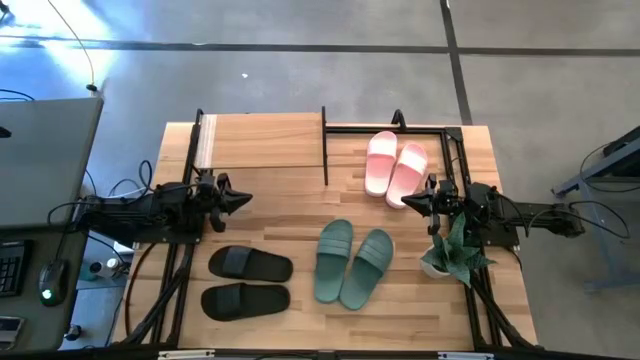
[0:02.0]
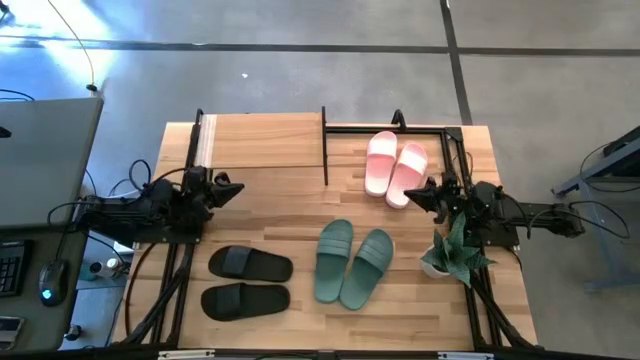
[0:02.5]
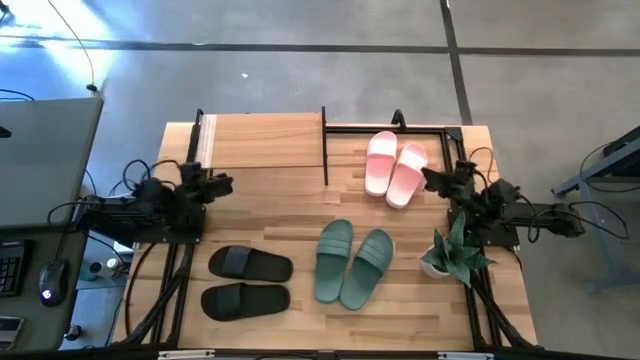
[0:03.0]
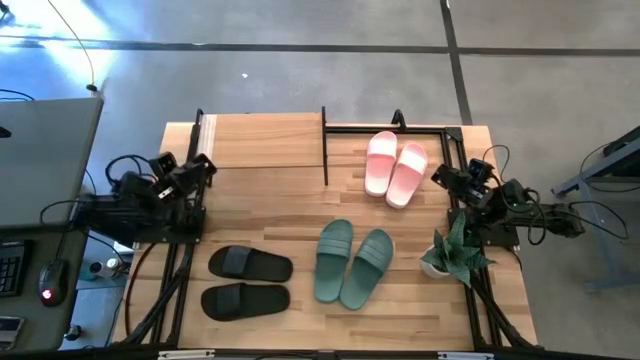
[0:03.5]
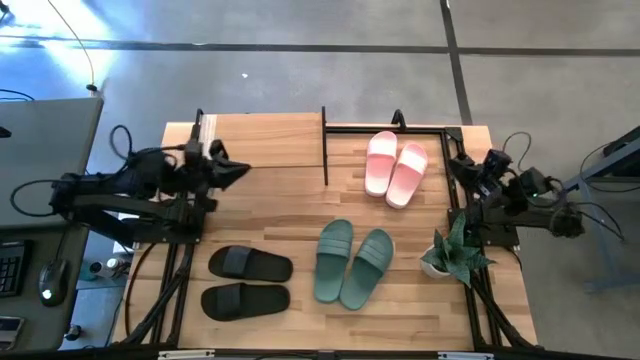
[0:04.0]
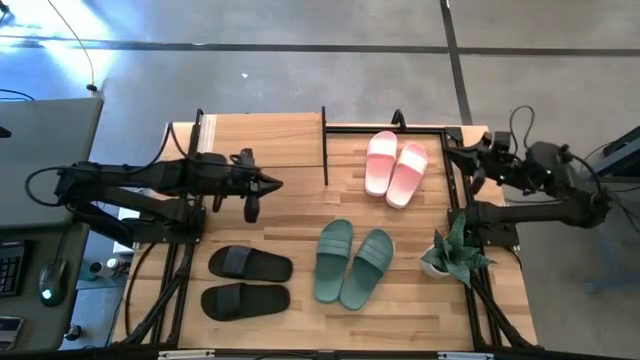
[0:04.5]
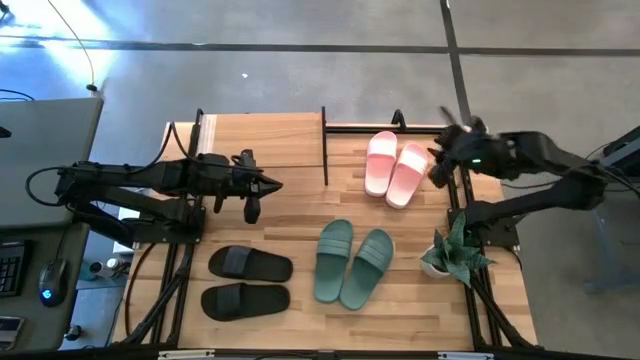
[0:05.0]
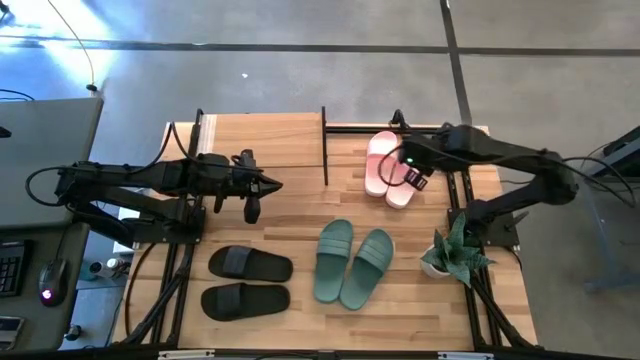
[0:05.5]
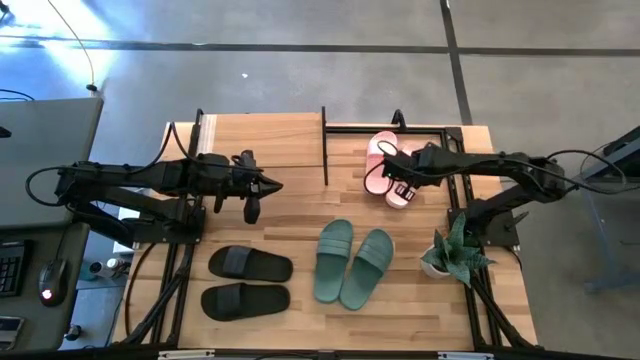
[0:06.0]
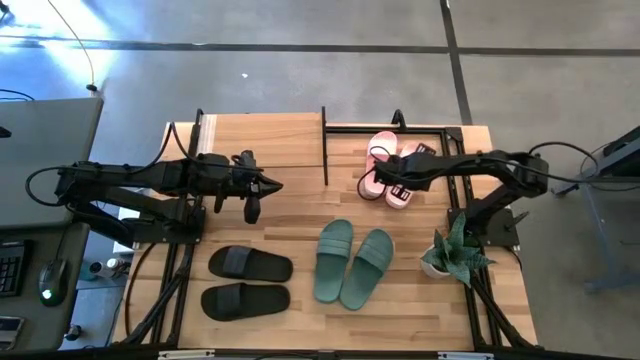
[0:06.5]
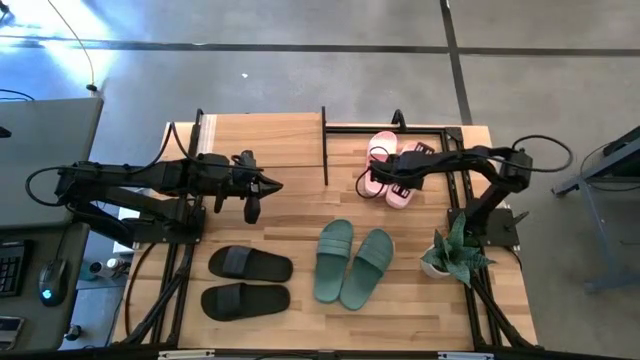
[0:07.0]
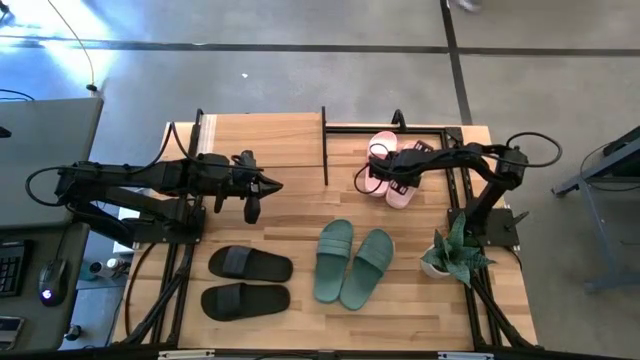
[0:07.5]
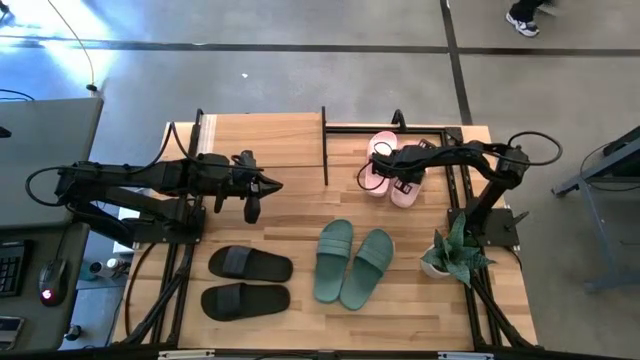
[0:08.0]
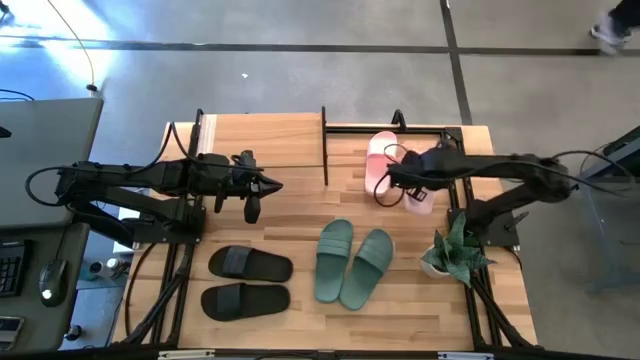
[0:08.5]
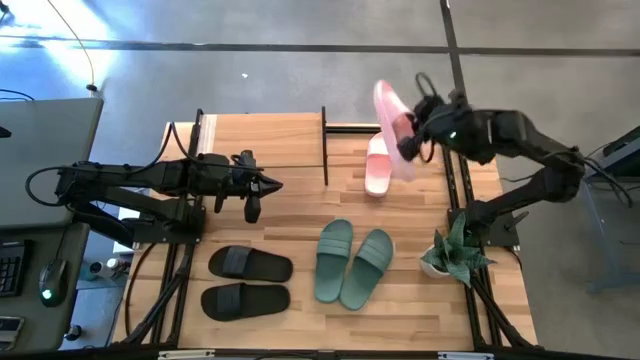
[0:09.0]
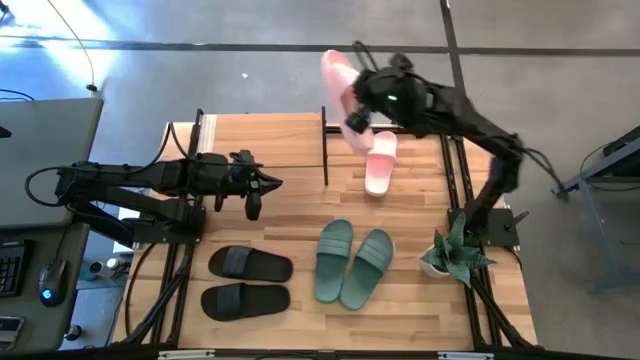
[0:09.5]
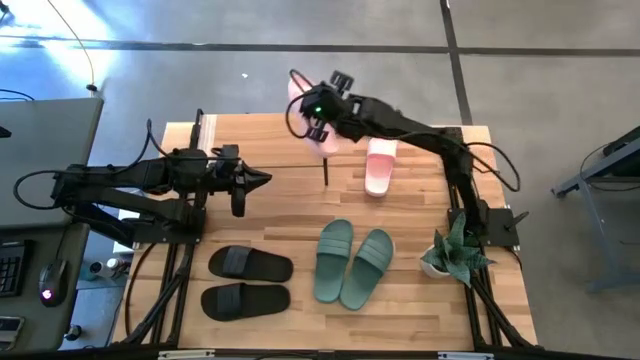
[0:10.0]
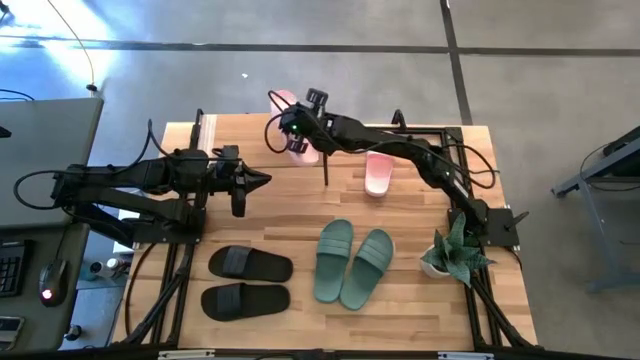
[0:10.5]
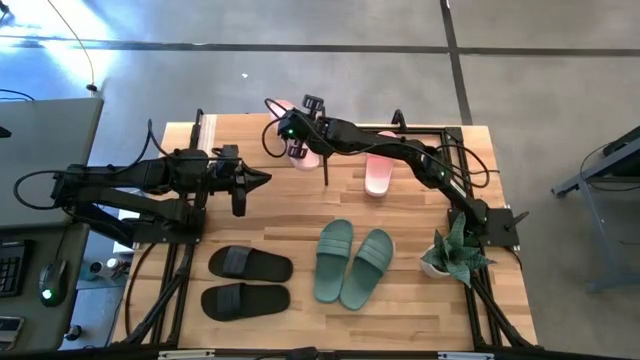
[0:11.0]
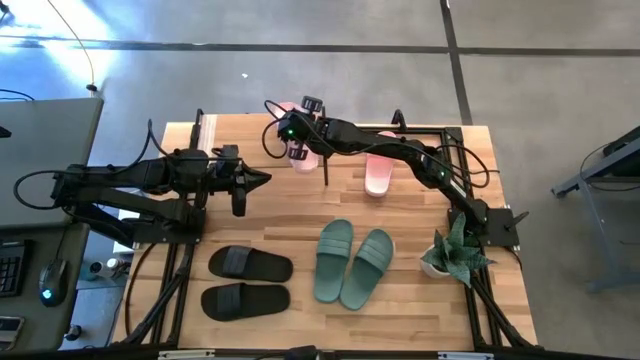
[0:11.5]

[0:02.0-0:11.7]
Task: Pick and place slides into the shelf
Put the pink left slide on the shelf

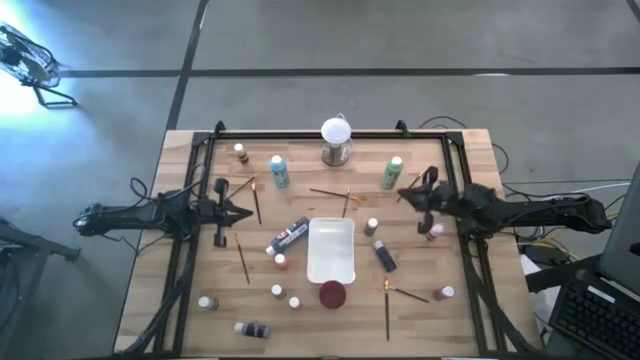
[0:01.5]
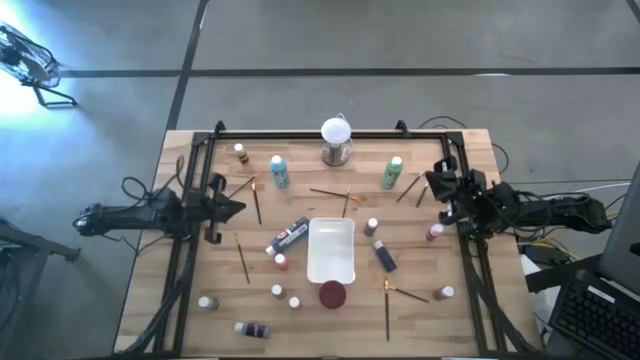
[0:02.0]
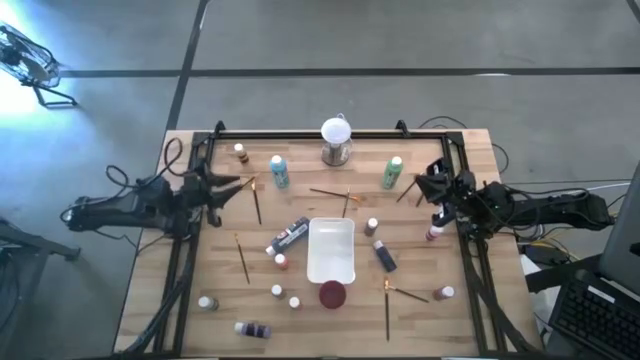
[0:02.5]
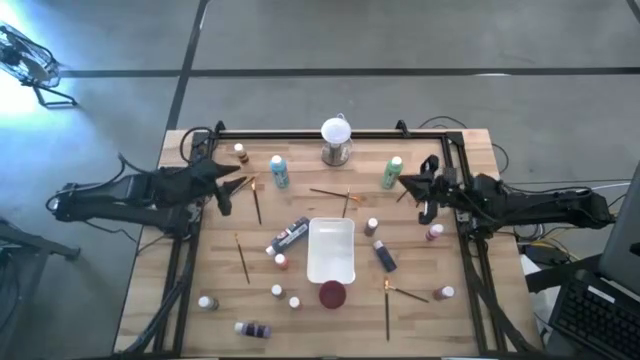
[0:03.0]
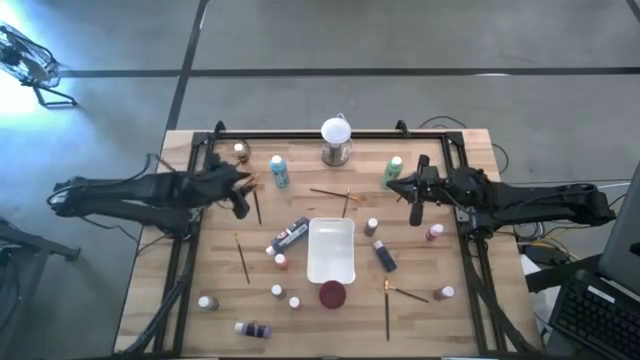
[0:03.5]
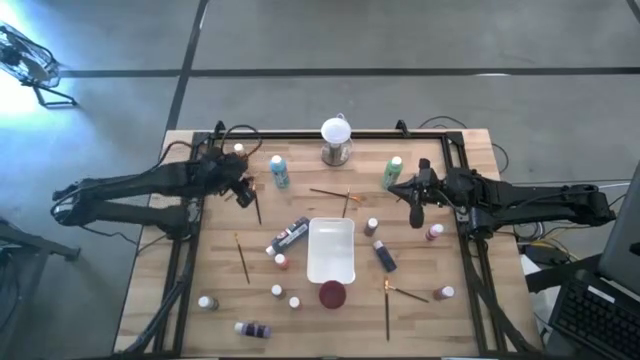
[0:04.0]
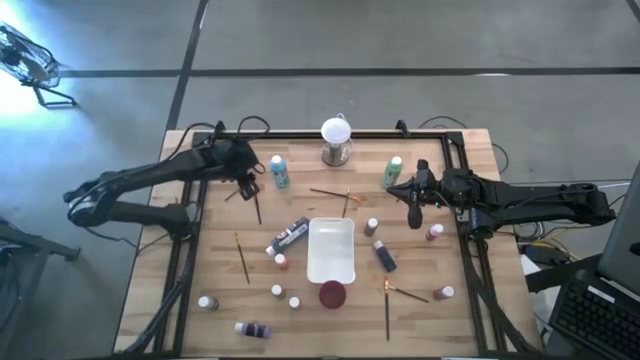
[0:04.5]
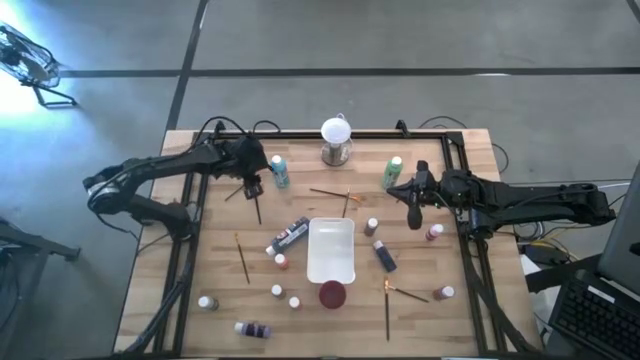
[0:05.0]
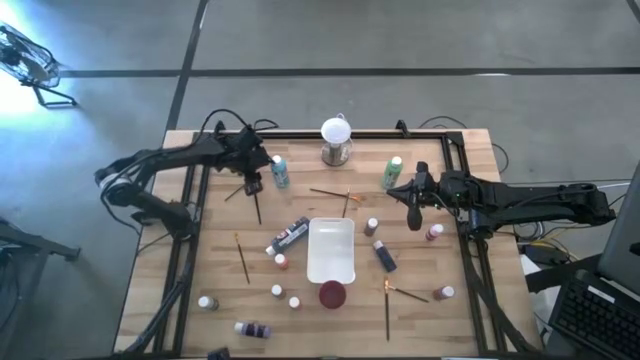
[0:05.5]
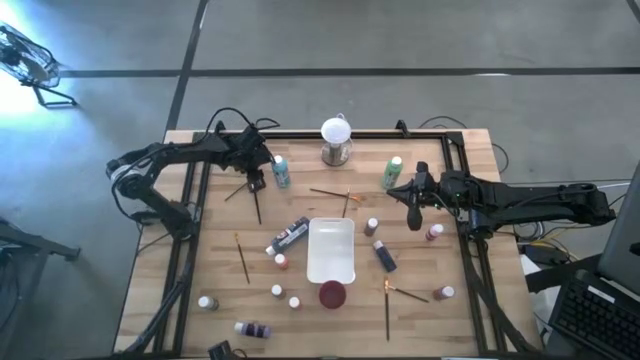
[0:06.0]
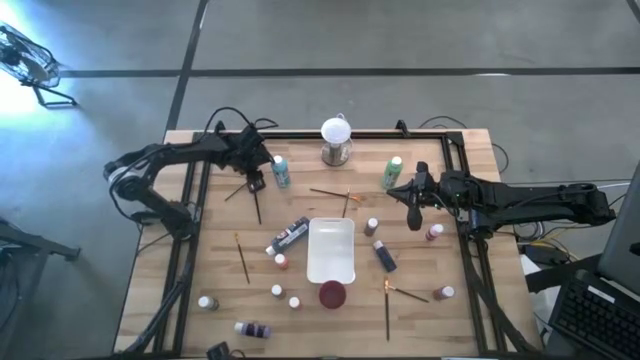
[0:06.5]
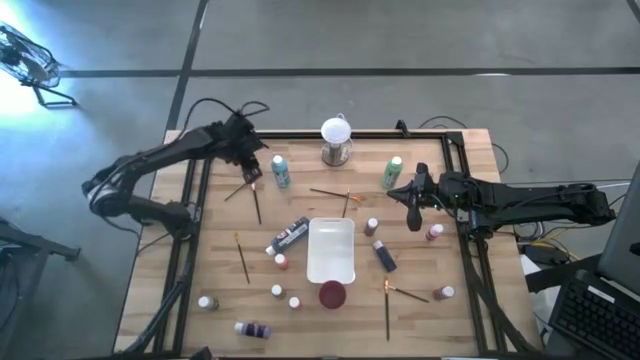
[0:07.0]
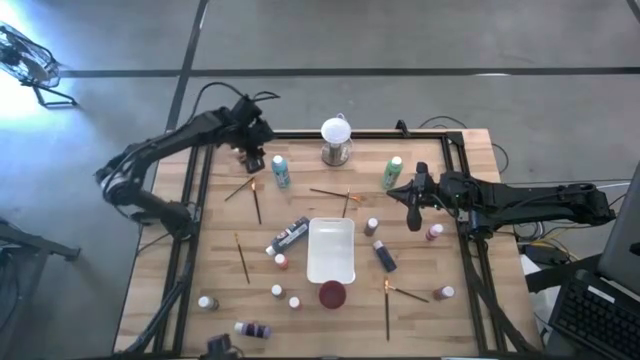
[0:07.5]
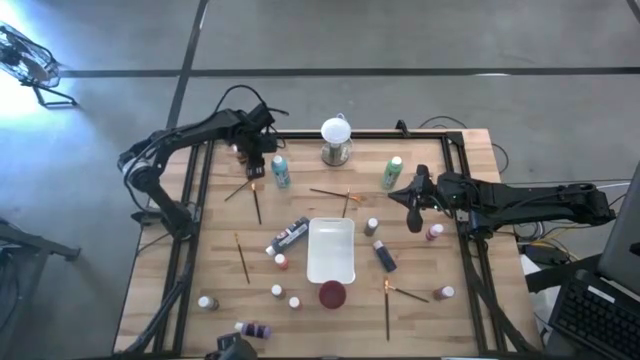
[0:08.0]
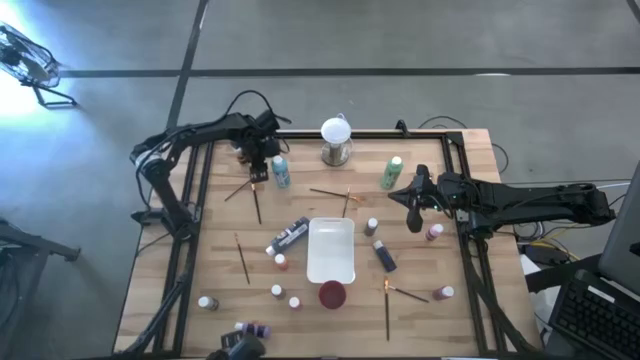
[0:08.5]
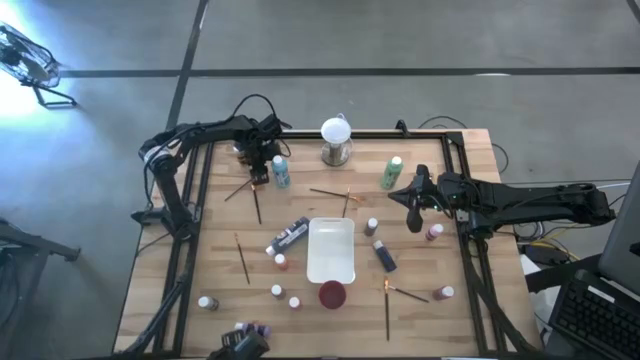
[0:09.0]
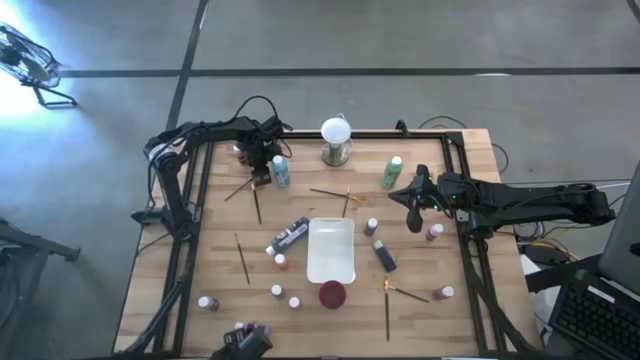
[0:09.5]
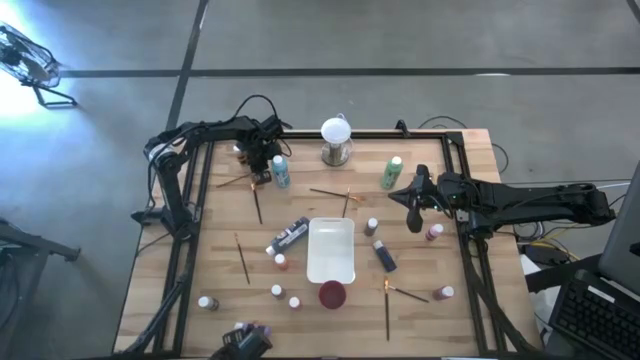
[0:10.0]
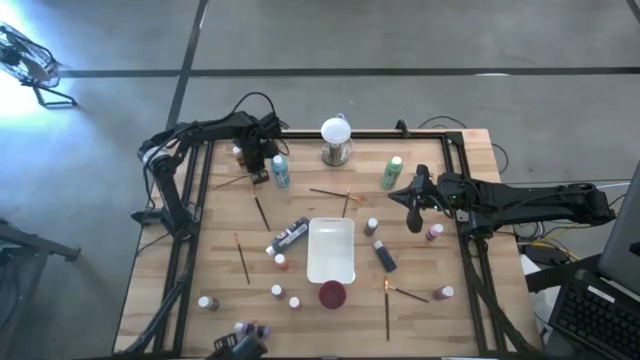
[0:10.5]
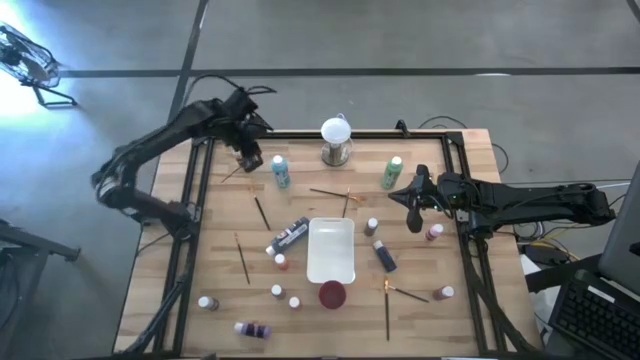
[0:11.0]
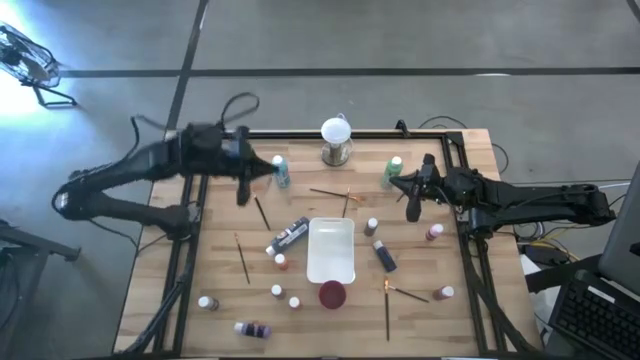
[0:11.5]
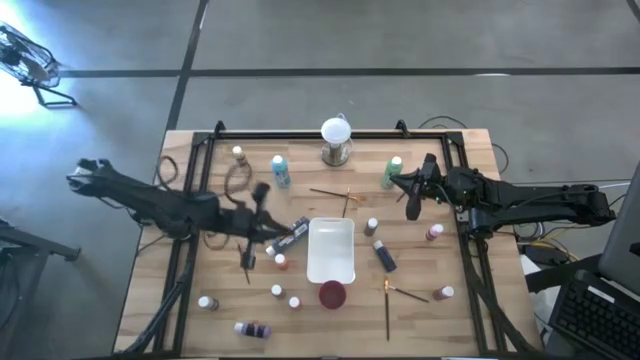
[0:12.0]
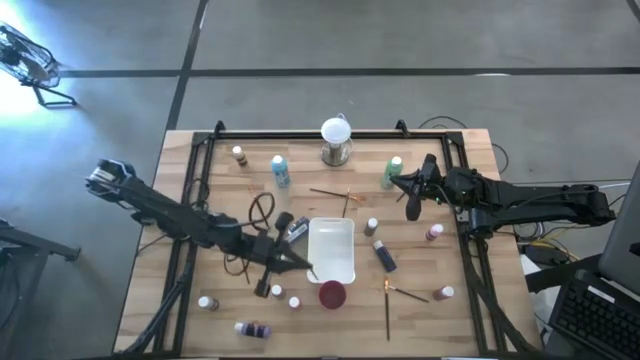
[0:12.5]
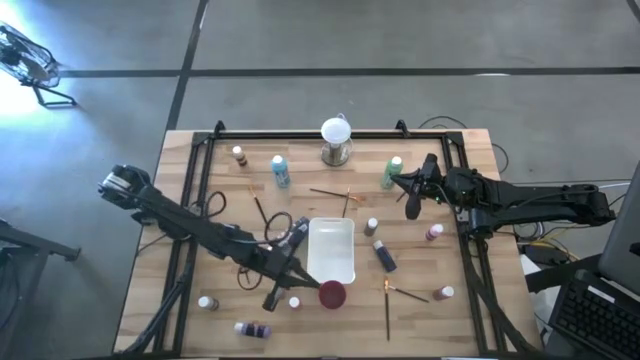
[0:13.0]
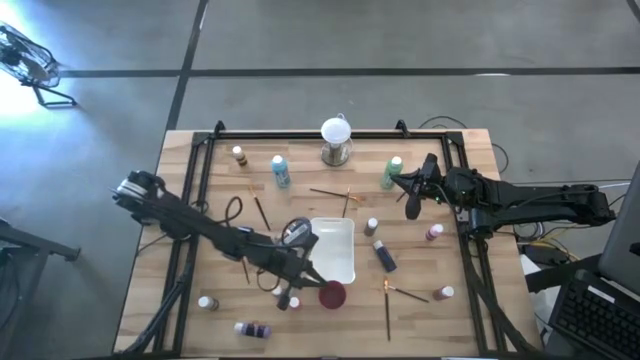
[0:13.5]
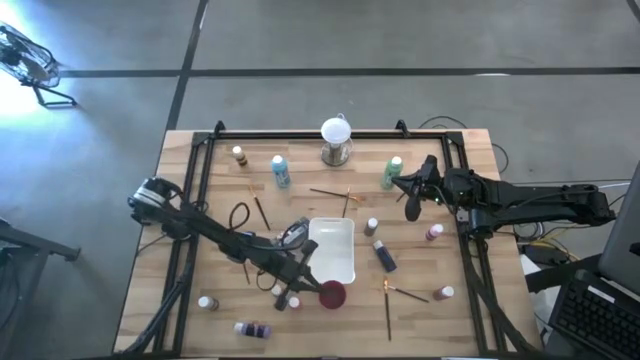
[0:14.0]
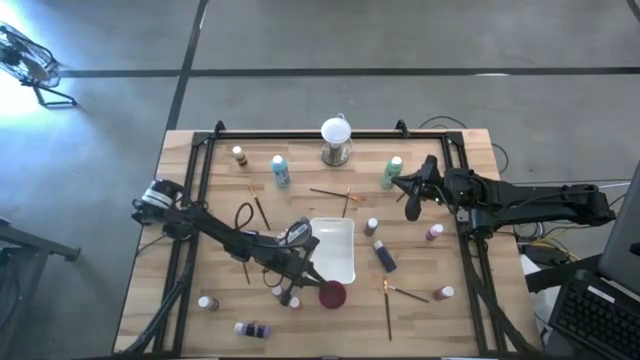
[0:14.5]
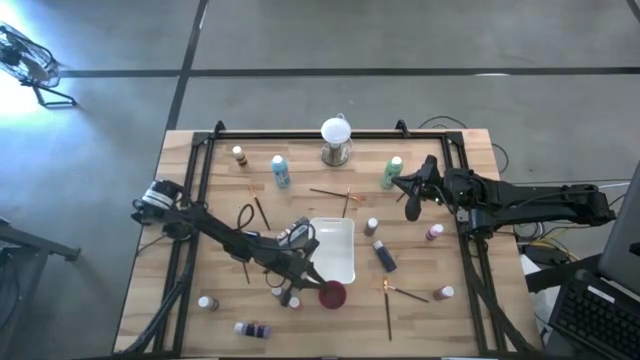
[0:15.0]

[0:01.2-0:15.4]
Task: Pick & Place Paint Supplies
Put the gold paint brush into the red cup
